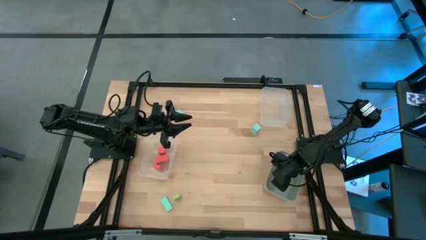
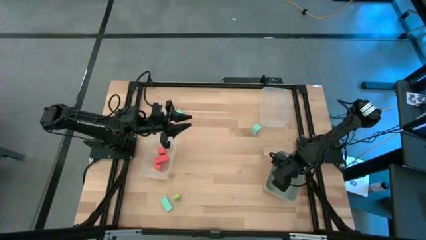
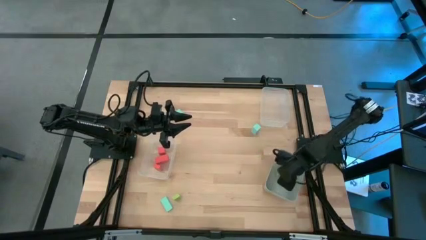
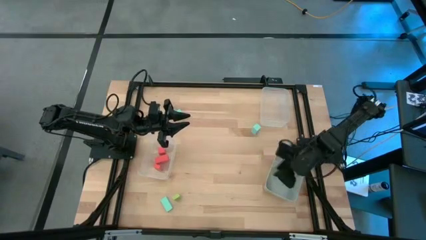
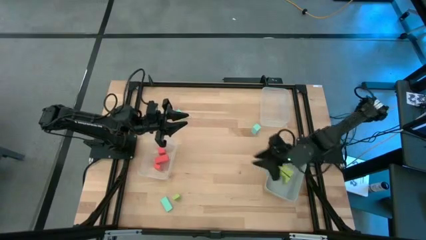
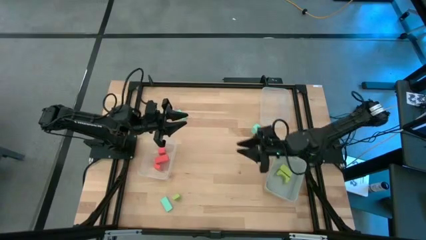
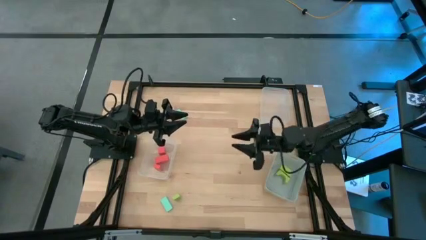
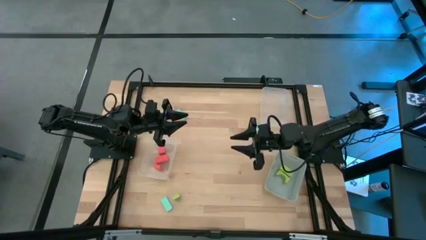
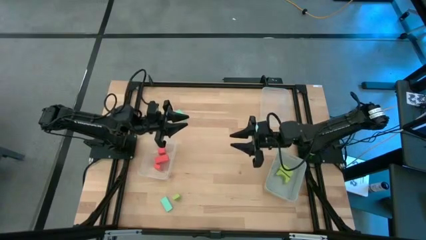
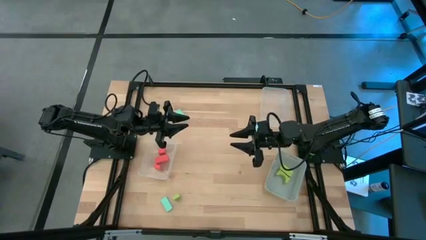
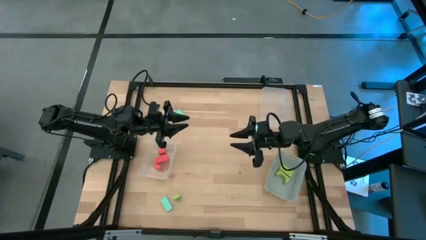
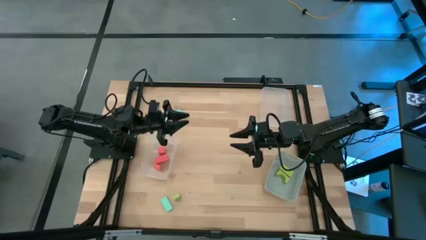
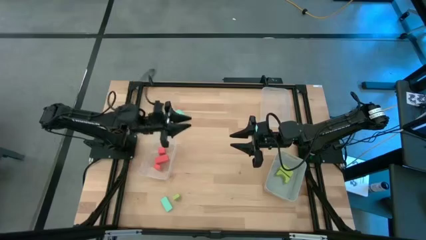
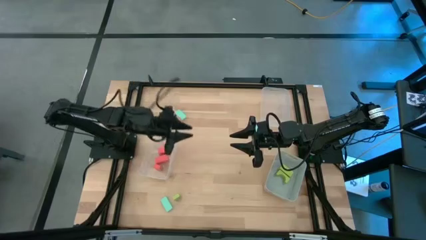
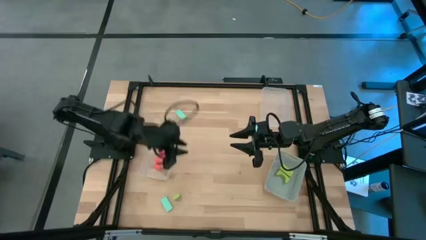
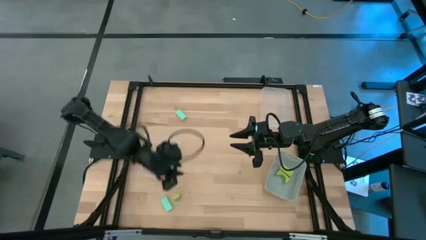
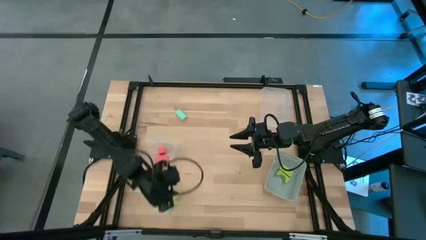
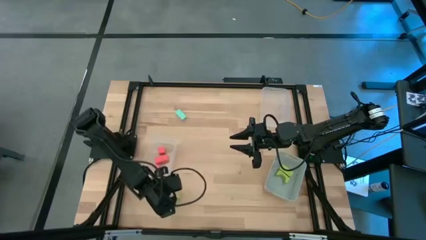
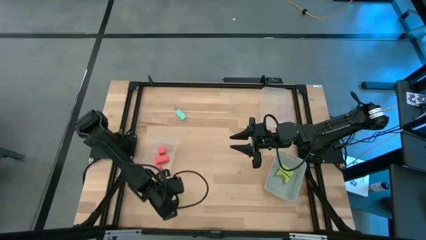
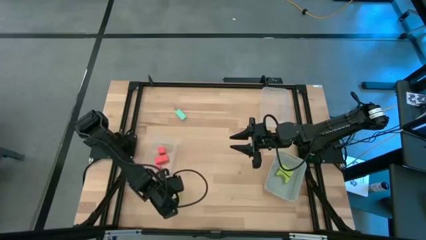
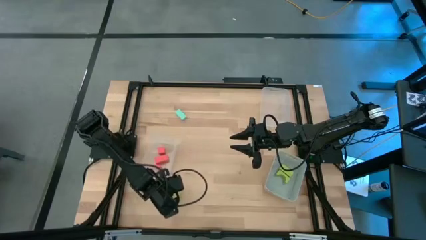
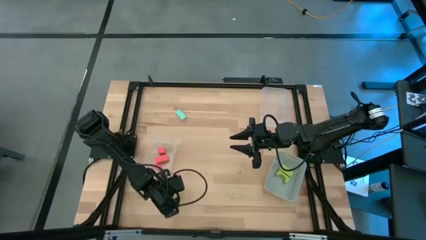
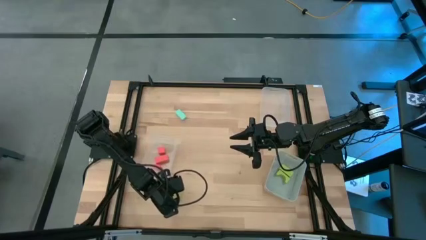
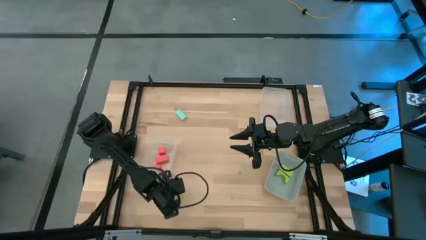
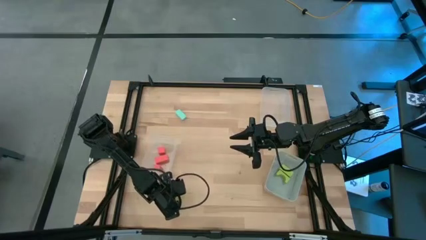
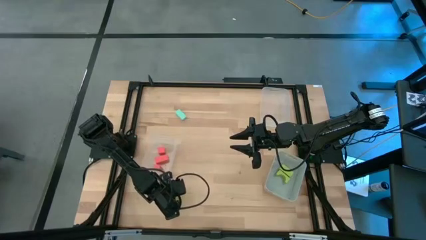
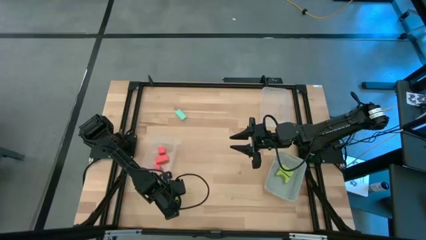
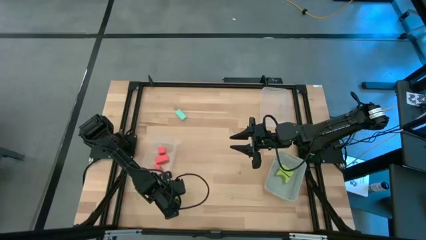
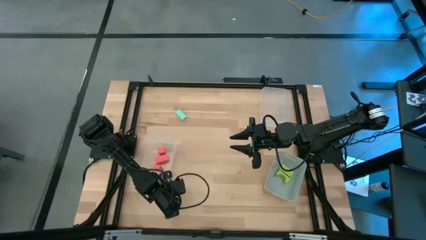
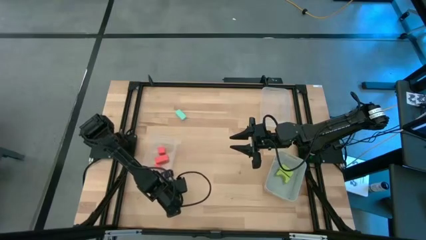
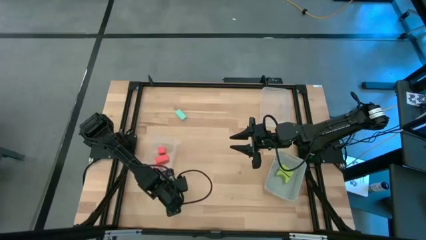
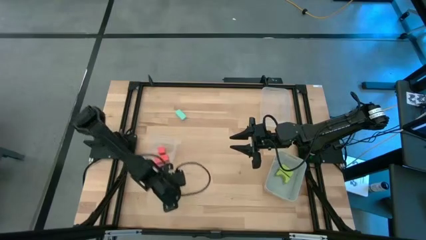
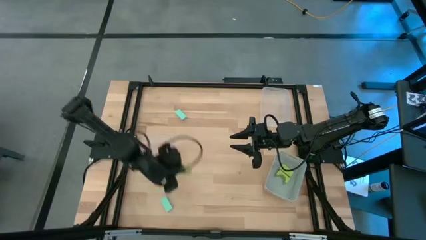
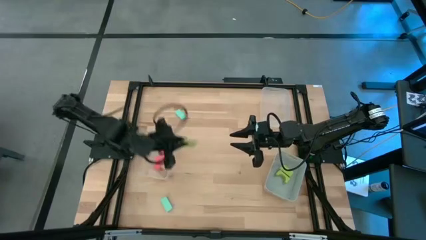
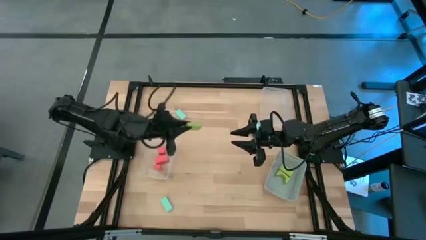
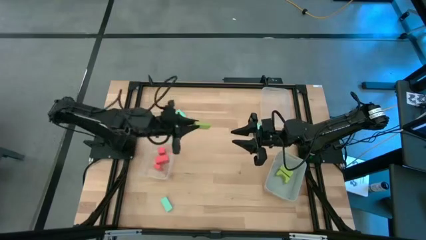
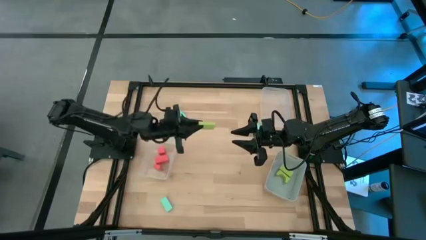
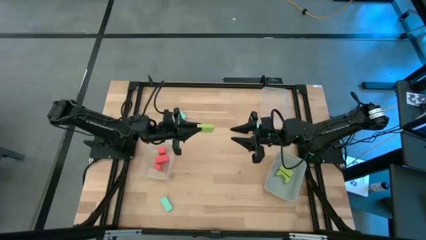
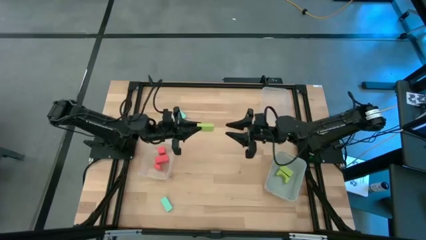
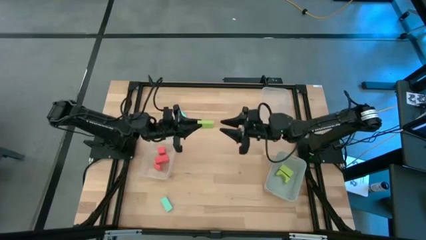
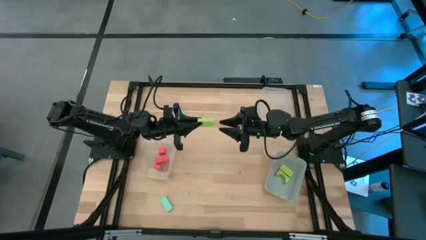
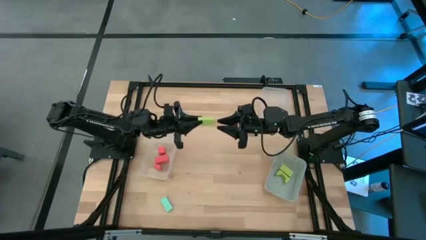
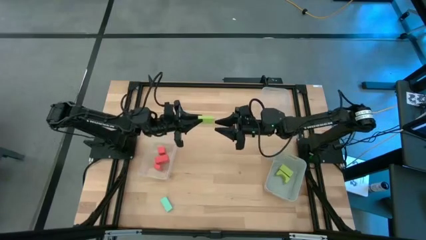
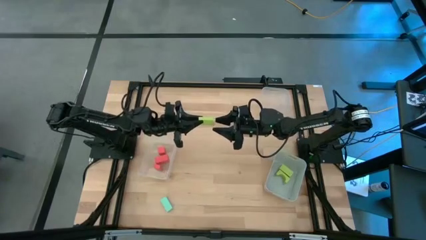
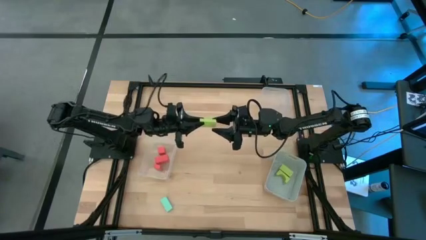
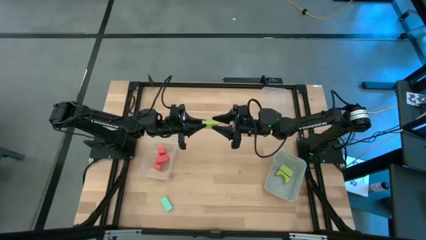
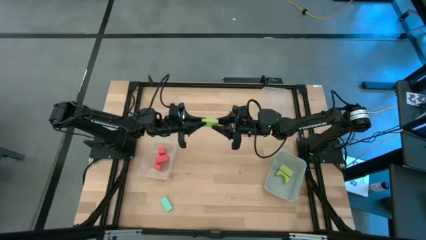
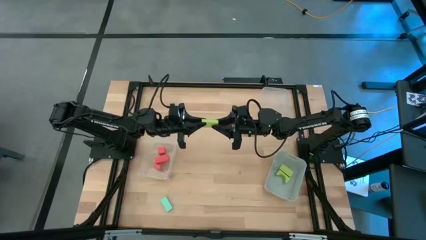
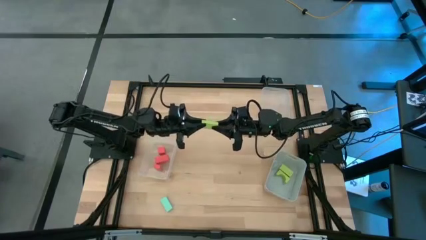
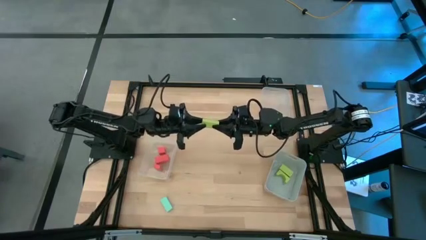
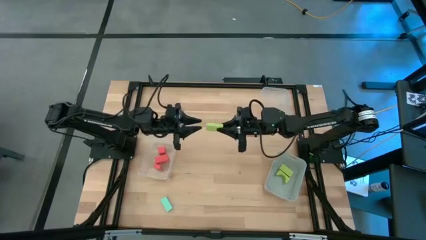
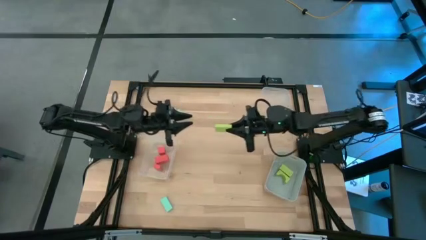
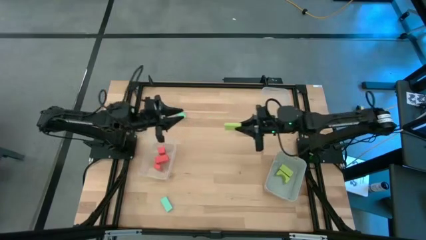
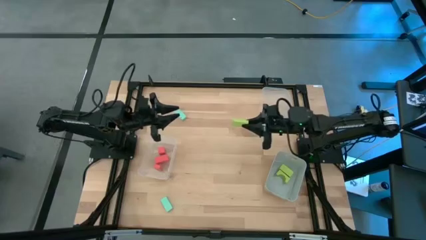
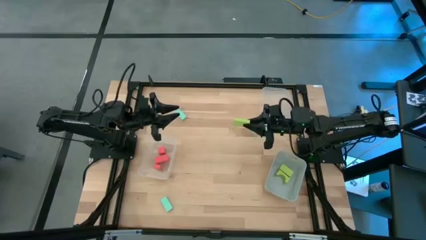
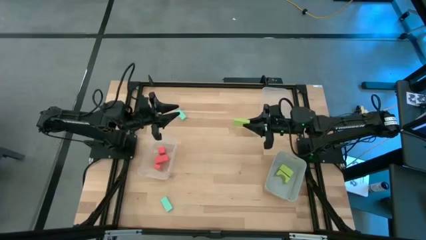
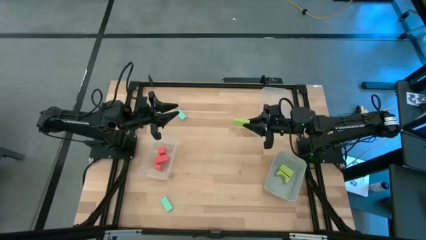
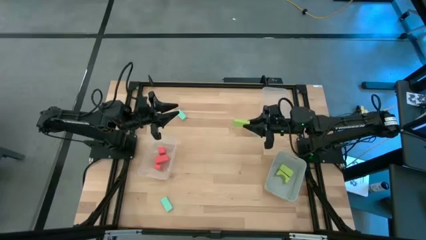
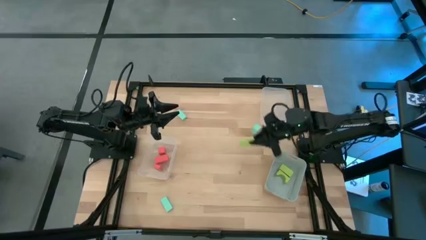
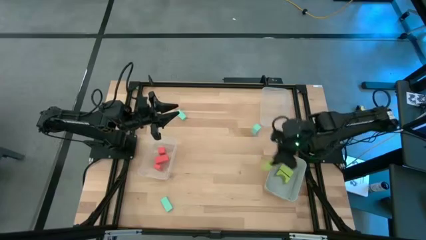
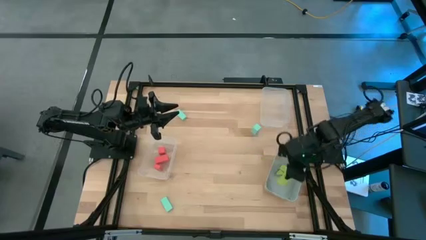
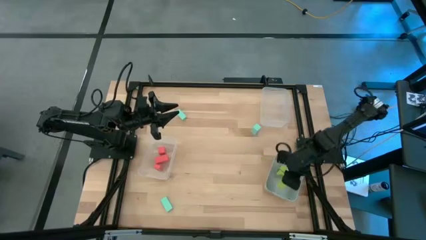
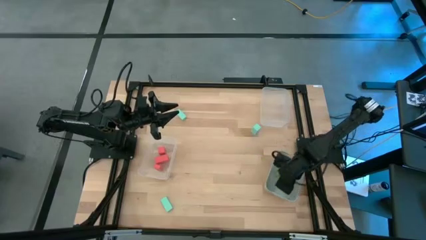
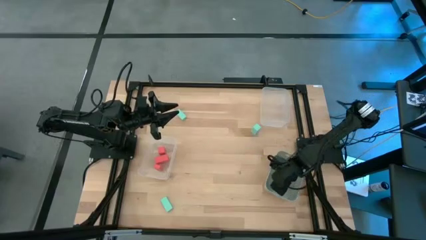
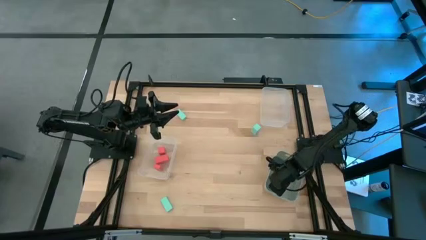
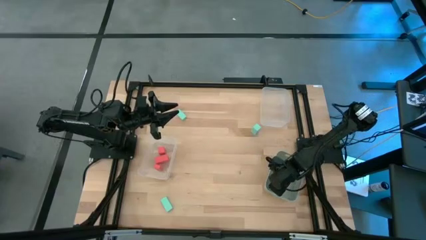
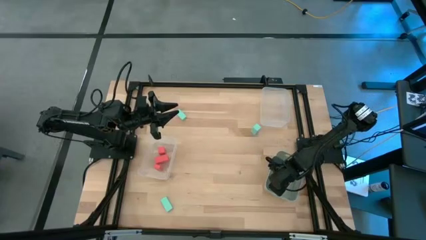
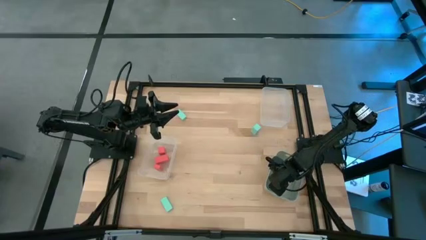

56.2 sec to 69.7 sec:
Task: Sort & place blocks by color
Put the green block into the gray bin

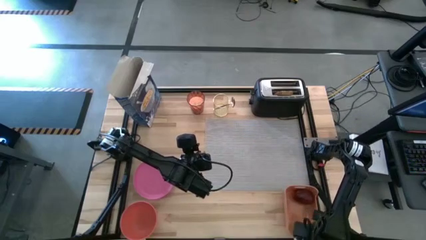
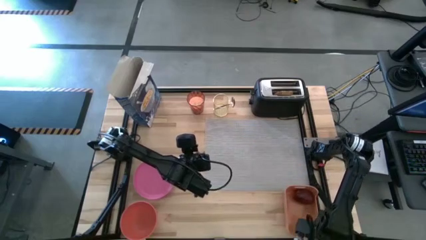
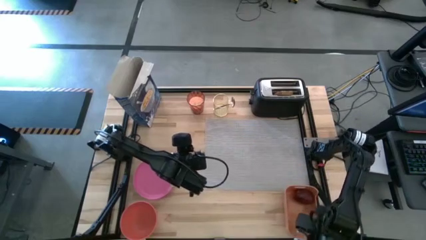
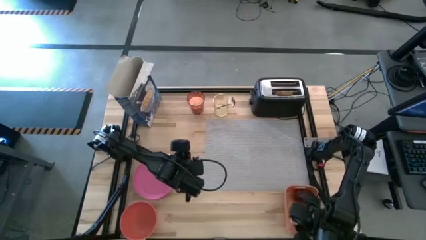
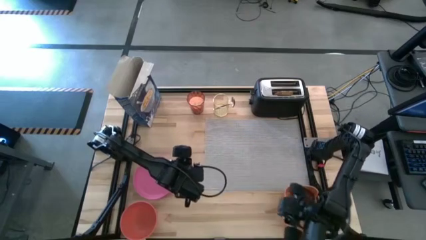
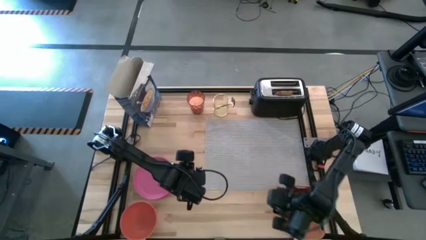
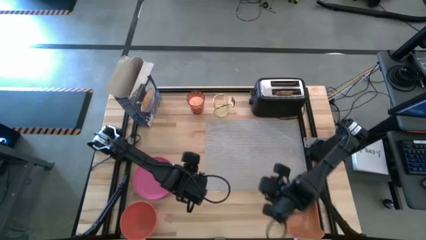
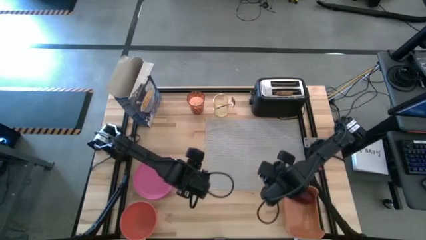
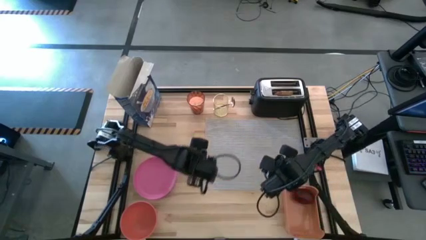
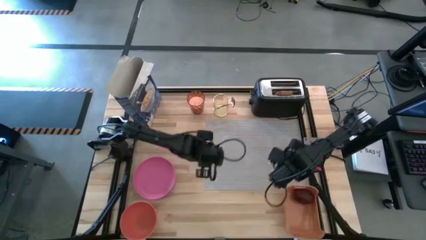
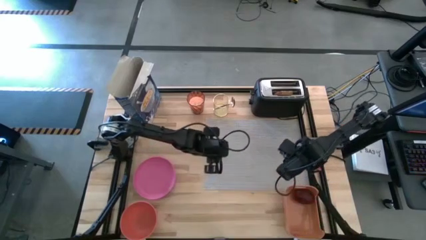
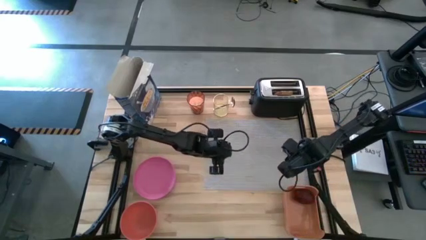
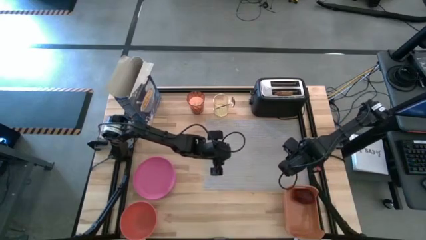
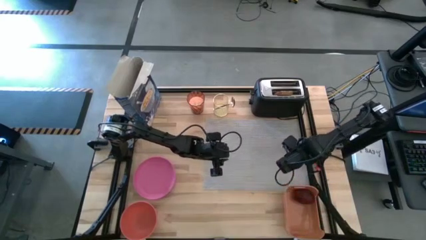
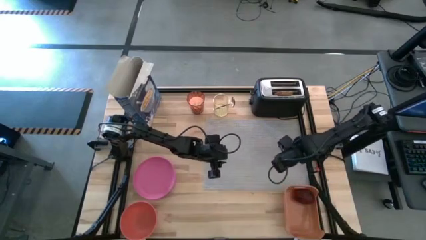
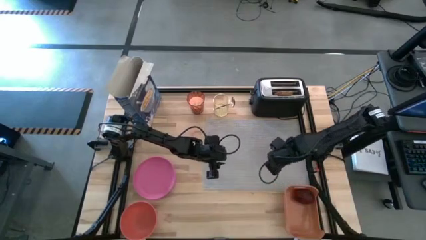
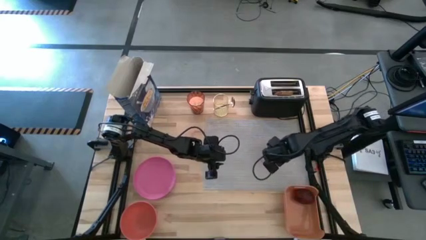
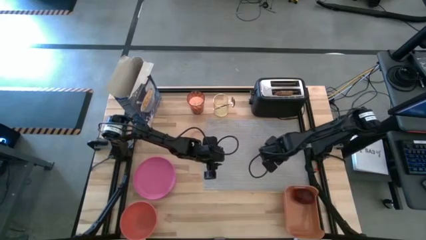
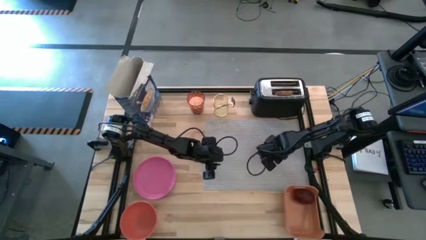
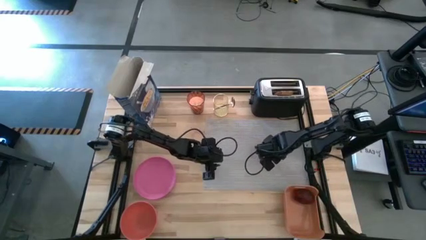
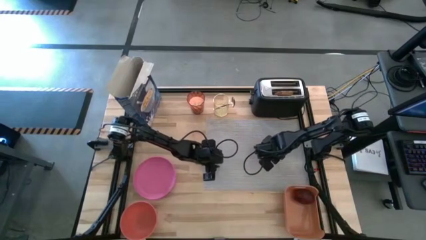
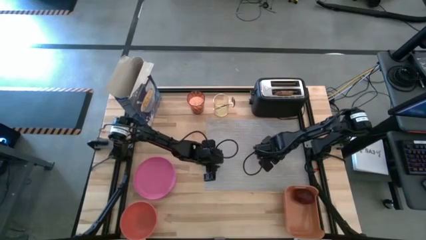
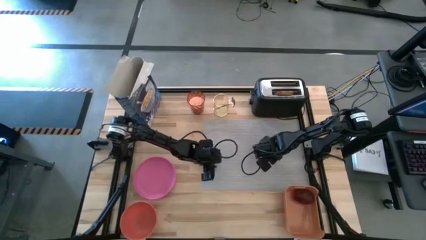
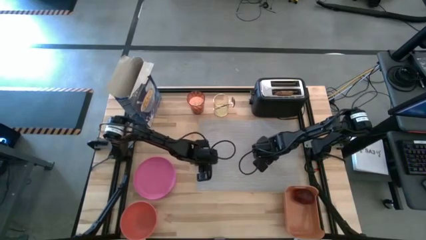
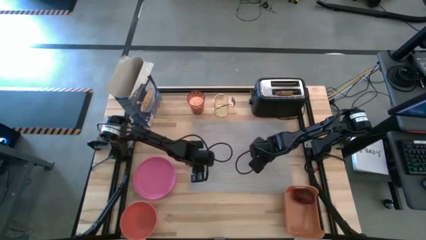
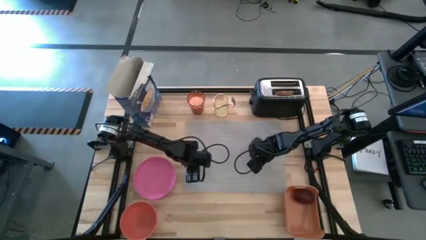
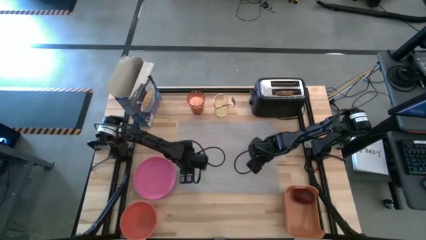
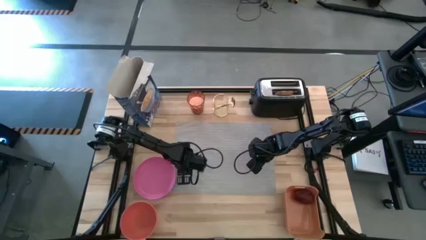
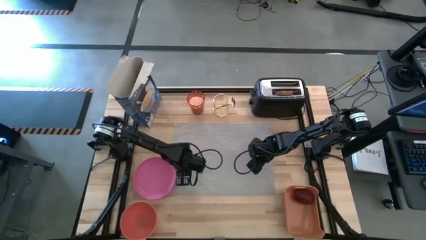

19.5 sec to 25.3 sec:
Task: Arrange a breakfast setting
Move the gray placemat to the center of the table
